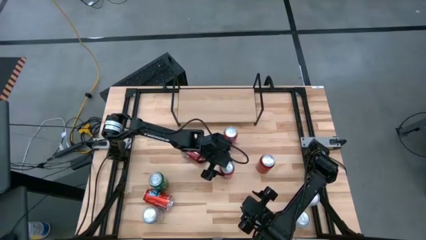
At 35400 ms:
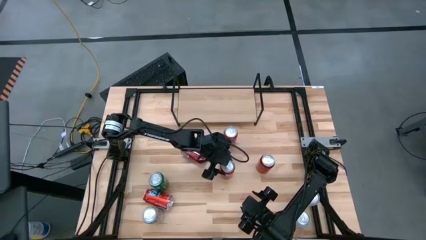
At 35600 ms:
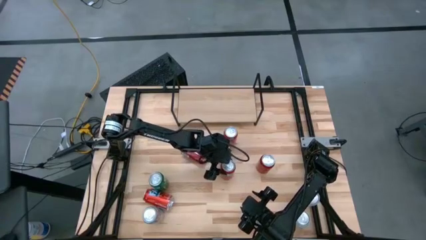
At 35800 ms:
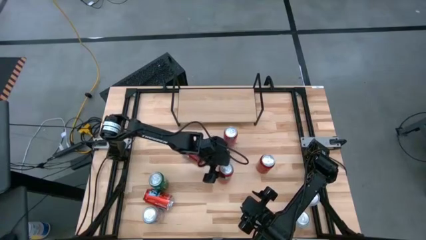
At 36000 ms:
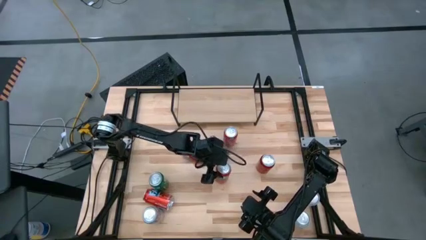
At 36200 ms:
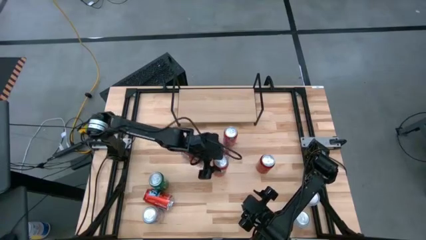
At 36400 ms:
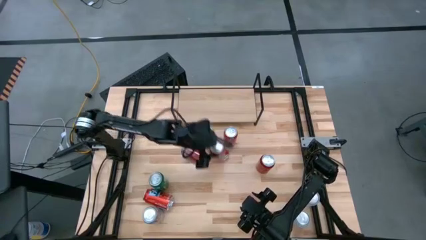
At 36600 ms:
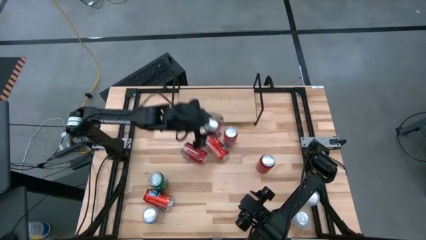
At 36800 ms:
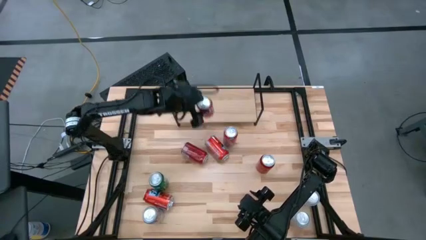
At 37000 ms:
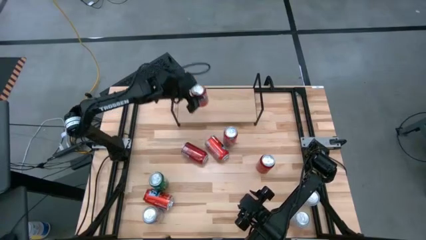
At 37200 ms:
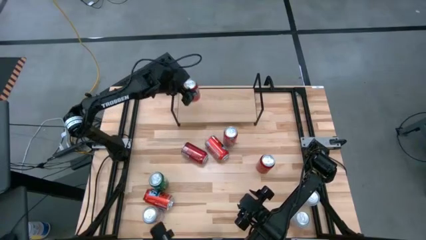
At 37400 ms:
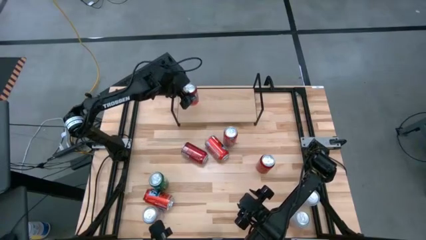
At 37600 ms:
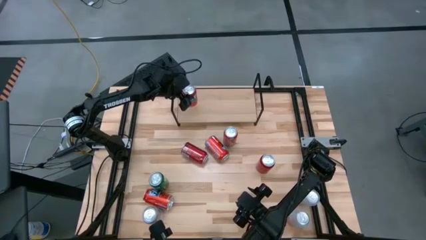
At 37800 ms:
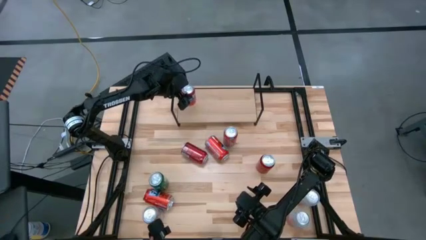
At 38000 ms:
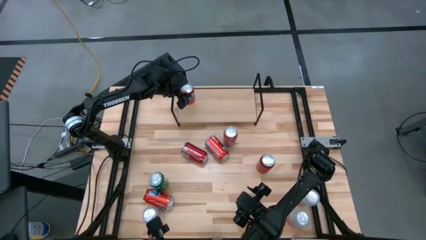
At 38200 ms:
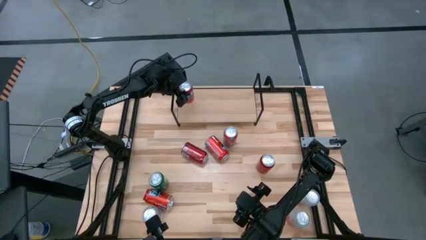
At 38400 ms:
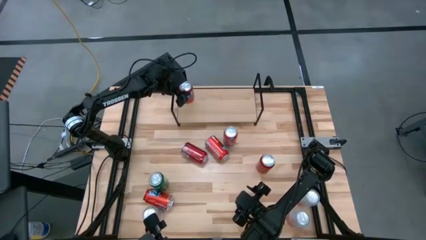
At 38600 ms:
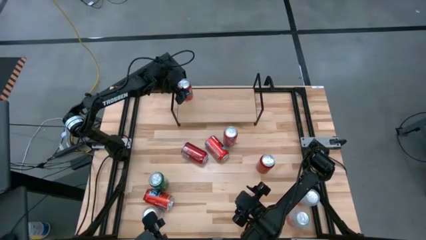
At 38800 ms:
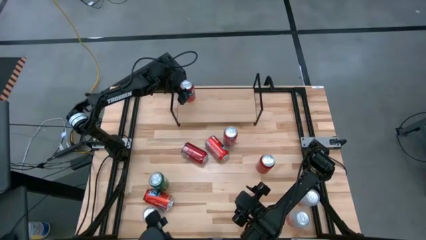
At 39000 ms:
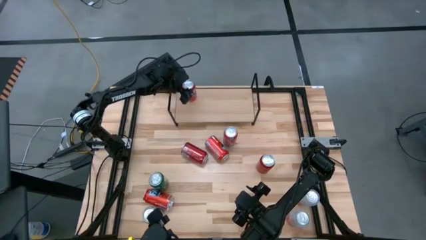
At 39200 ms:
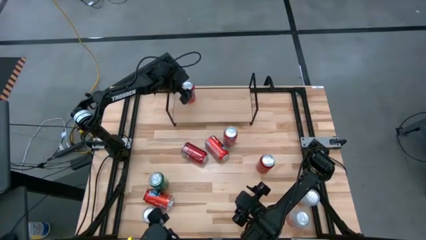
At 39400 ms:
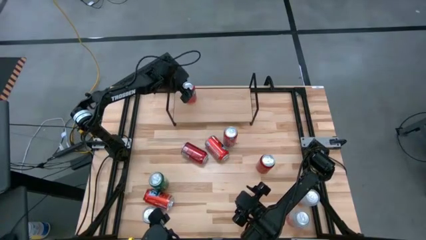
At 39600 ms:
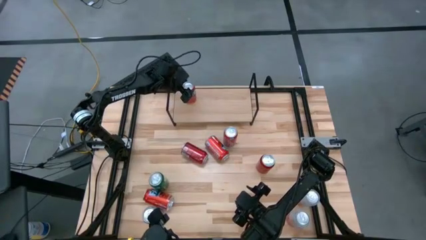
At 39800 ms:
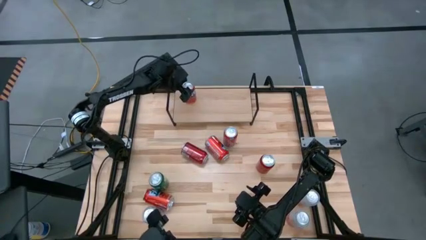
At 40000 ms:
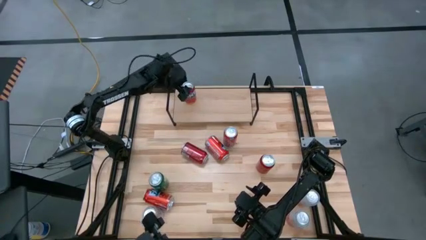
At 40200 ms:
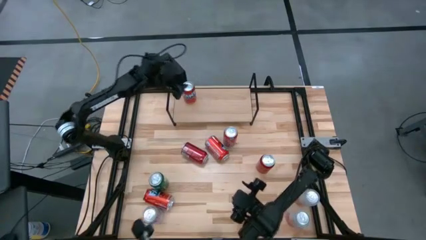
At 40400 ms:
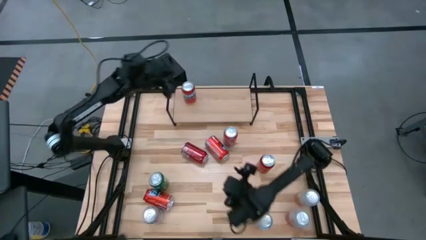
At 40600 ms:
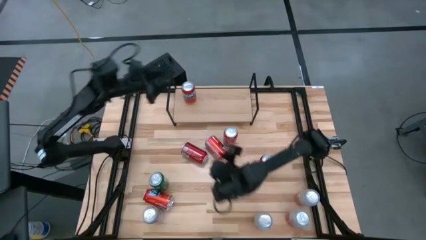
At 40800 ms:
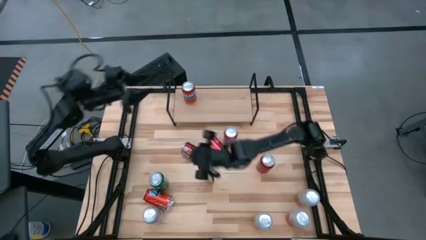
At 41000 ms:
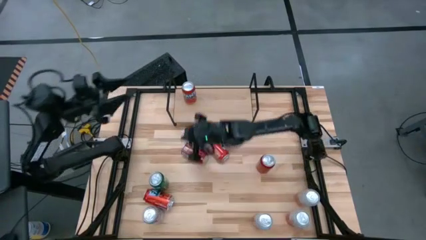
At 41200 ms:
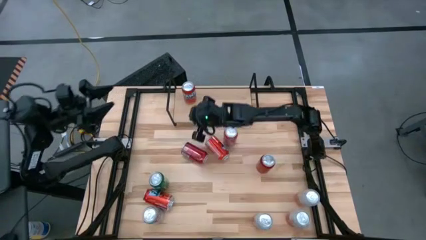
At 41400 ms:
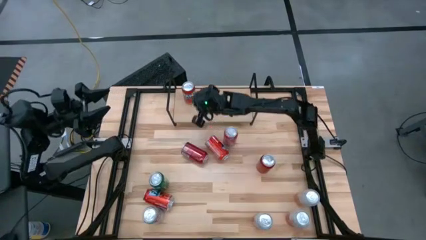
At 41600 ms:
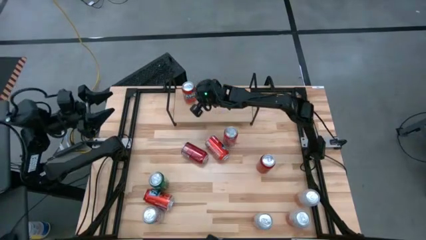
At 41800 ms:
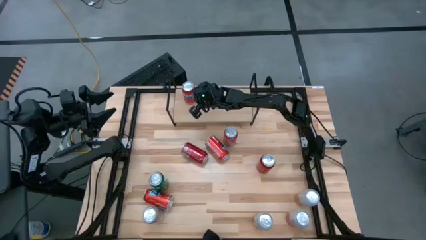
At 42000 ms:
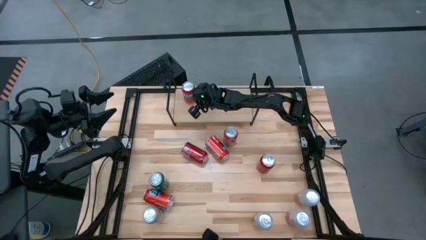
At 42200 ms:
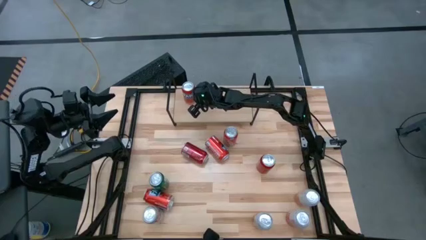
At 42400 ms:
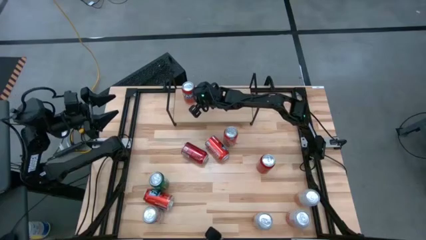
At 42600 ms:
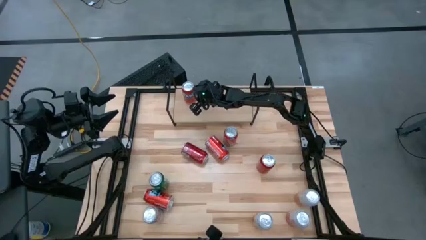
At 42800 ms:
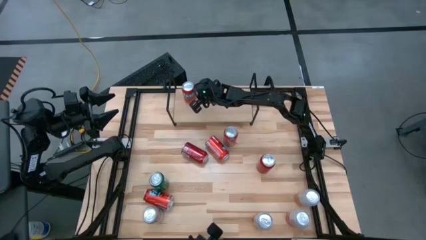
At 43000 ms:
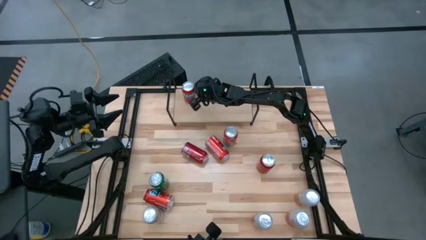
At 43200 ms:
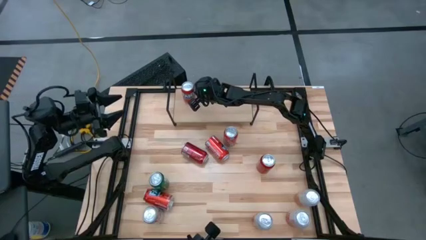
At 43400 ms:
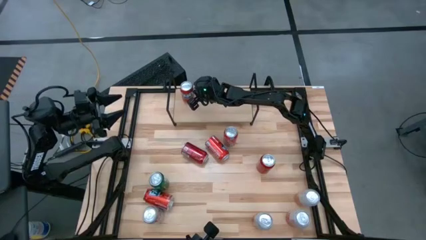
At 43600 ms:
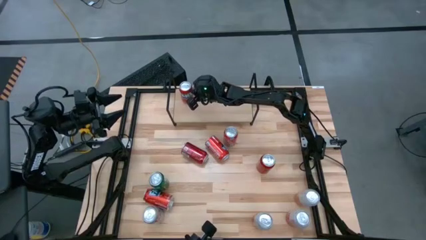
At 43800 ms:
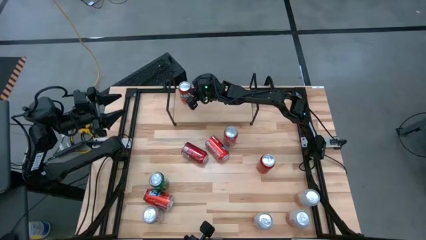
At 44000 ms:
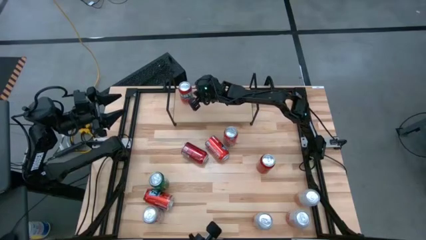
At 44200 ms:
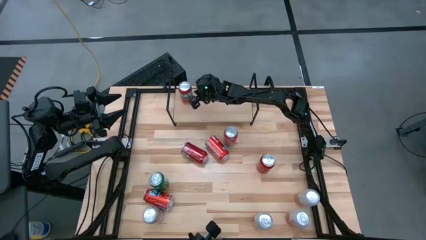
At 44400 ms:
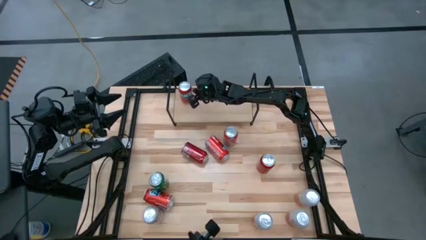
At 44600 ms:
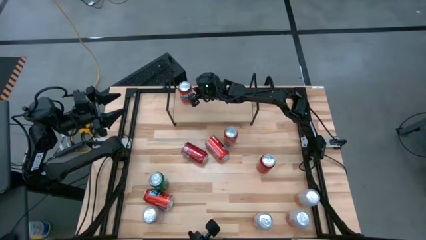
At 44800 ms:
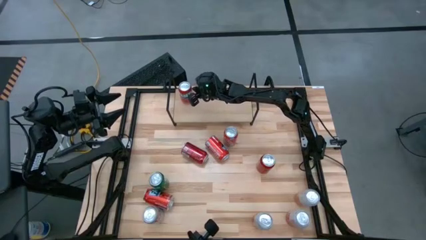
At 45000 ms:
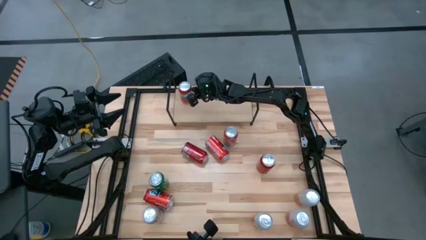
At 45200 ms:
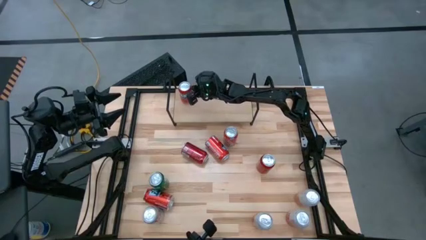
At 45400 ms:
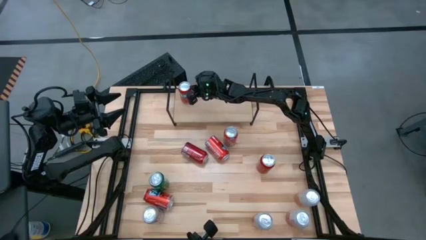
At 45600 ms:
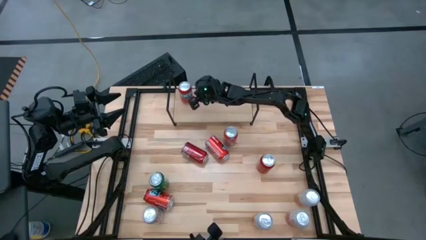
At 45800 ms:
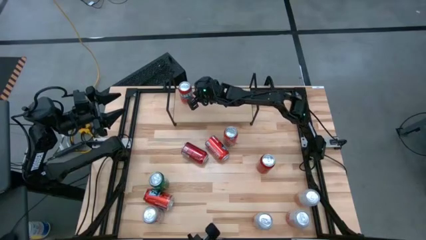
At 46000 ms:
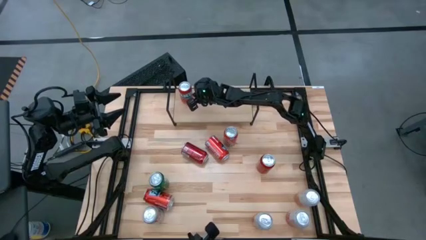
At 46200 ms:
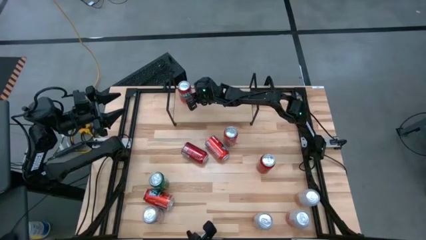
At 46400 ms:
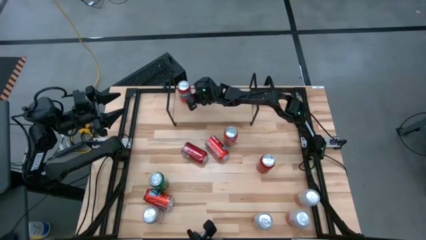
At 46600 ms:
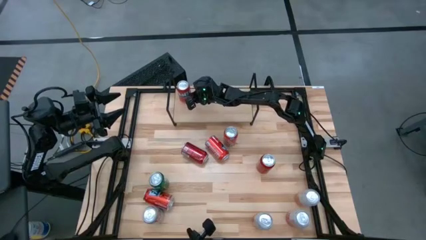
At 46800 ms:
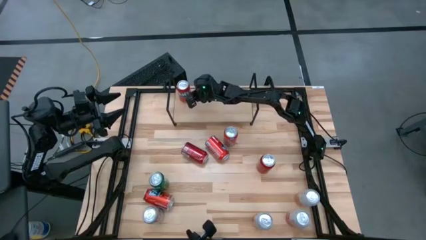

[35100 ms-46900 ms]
Task: Place canned beverage on shelf
Put the red soda can on the shelf
